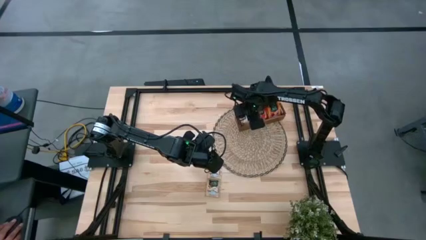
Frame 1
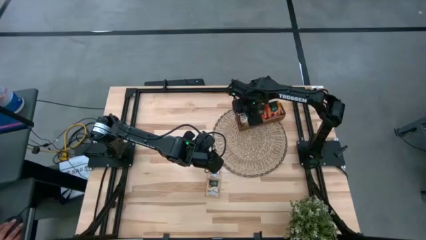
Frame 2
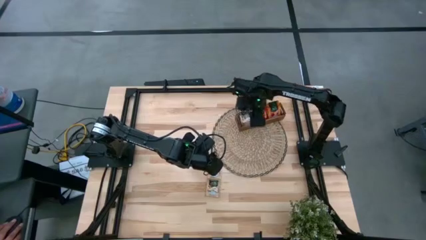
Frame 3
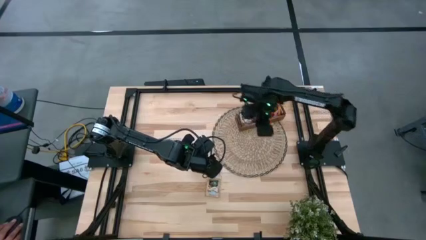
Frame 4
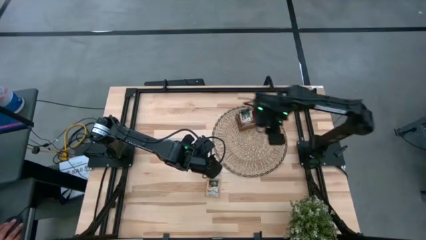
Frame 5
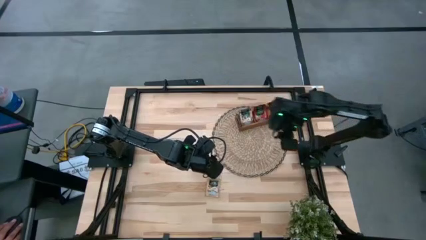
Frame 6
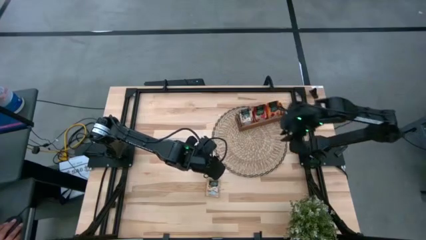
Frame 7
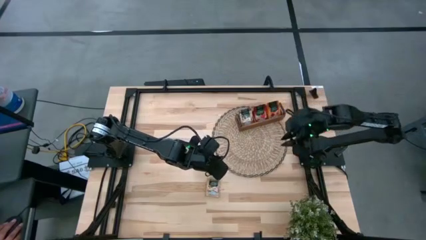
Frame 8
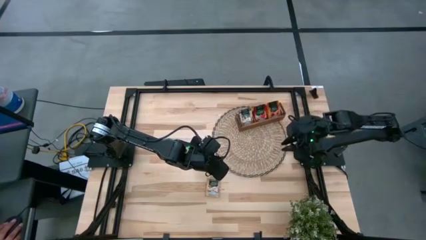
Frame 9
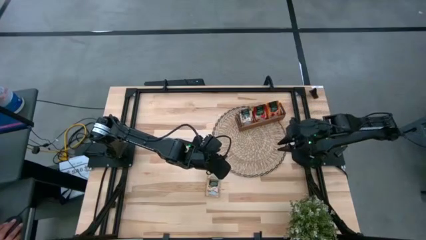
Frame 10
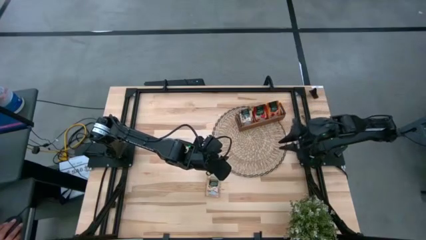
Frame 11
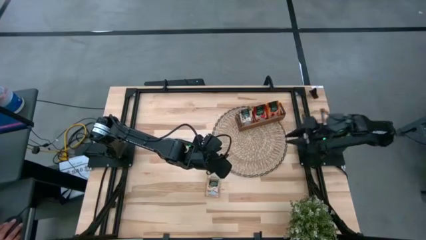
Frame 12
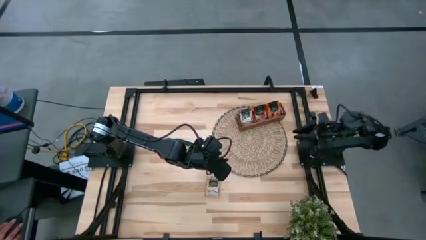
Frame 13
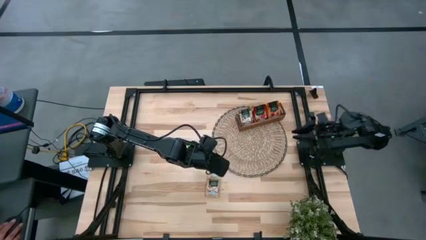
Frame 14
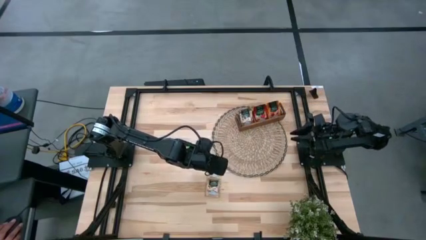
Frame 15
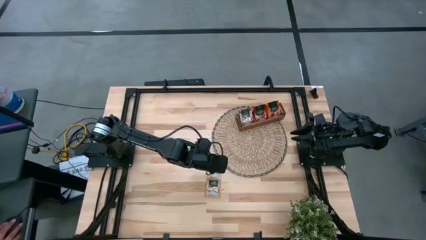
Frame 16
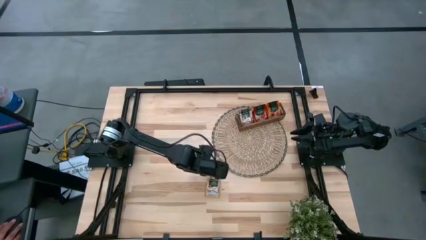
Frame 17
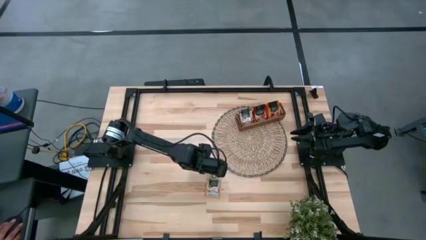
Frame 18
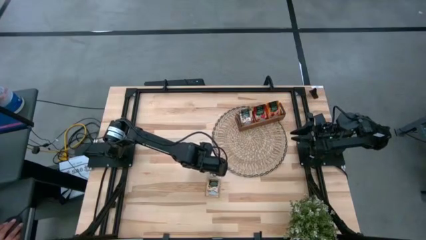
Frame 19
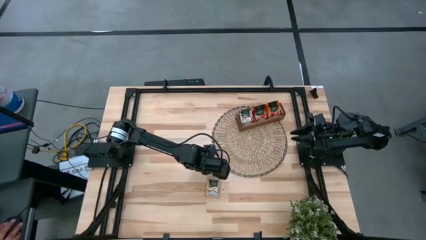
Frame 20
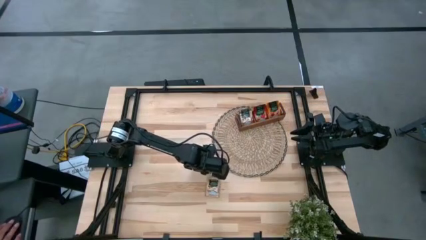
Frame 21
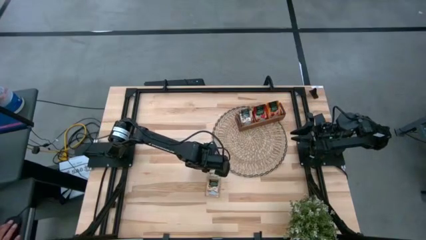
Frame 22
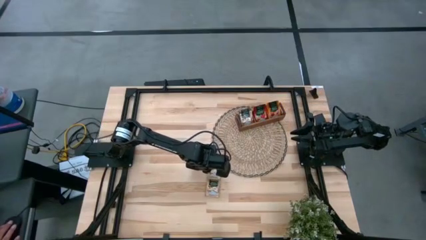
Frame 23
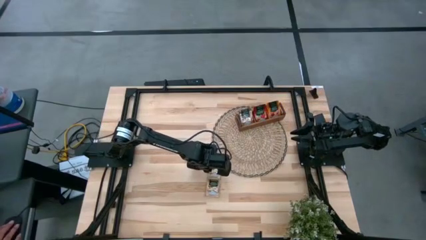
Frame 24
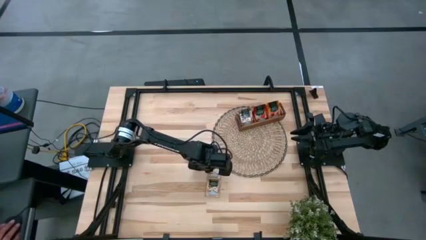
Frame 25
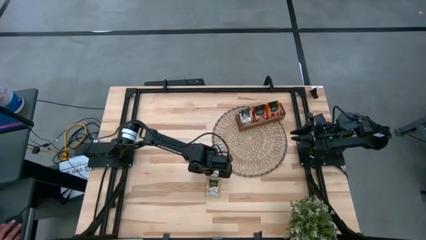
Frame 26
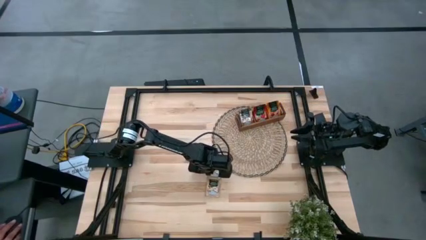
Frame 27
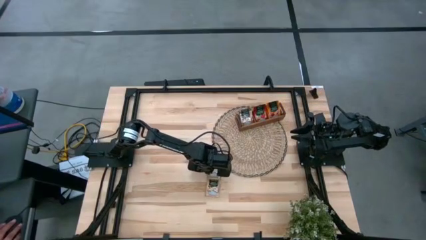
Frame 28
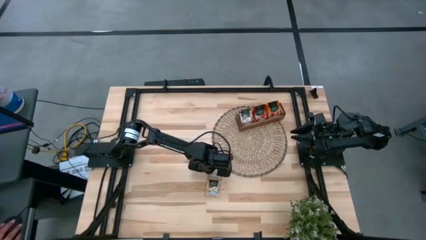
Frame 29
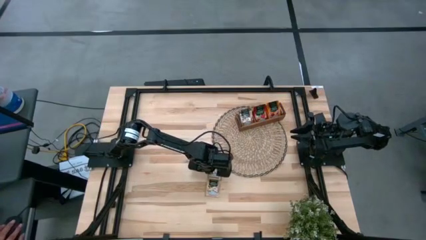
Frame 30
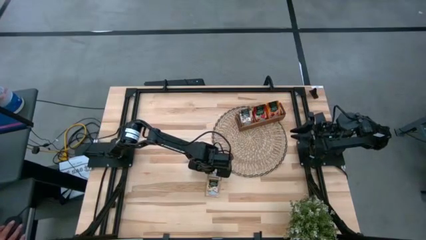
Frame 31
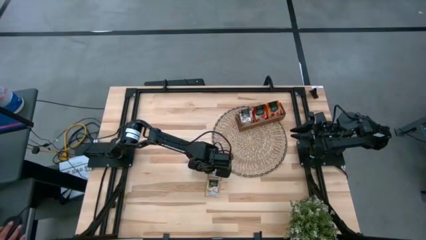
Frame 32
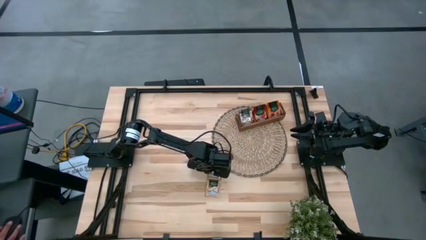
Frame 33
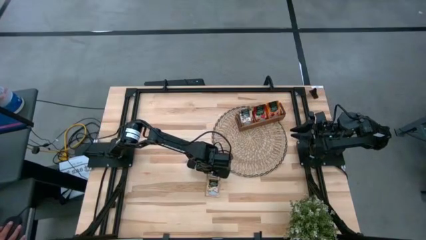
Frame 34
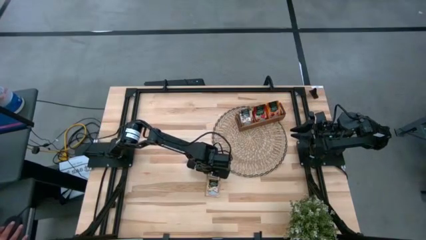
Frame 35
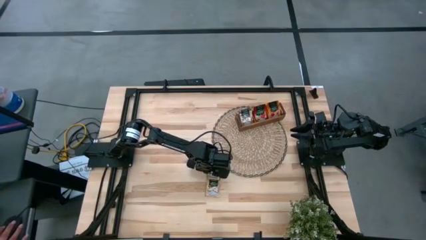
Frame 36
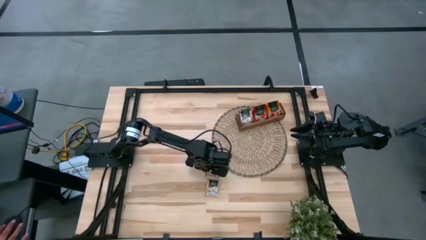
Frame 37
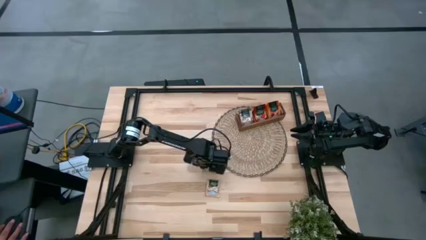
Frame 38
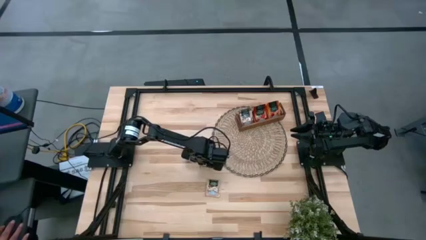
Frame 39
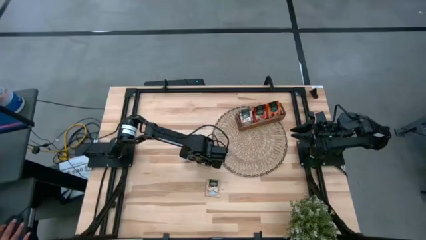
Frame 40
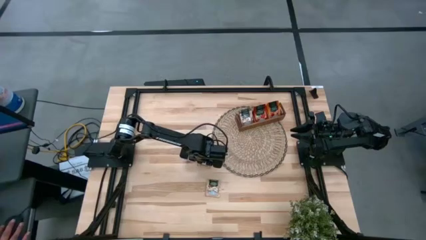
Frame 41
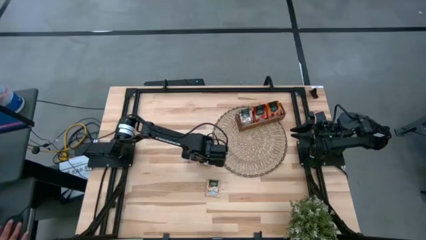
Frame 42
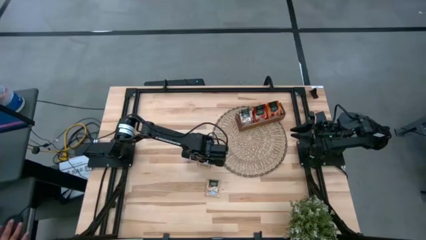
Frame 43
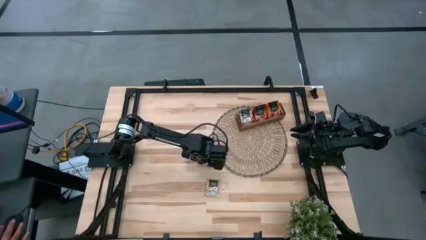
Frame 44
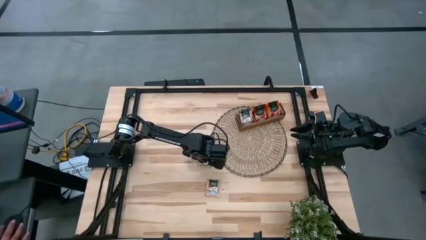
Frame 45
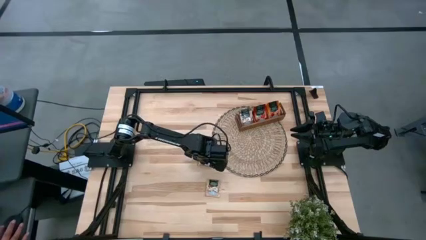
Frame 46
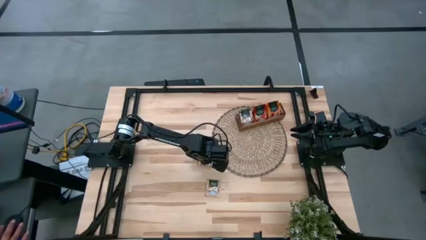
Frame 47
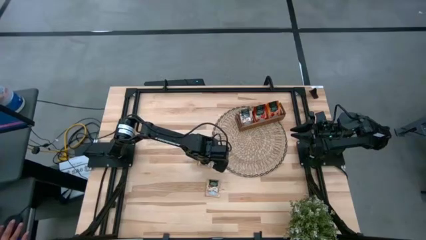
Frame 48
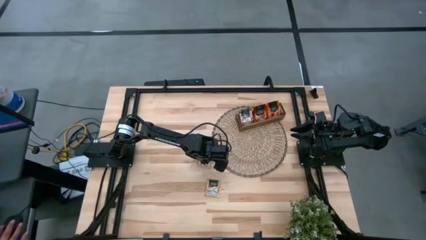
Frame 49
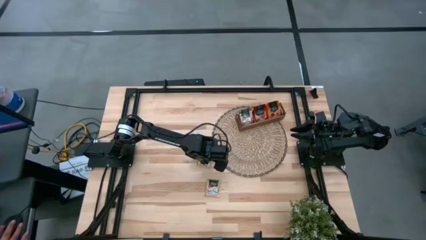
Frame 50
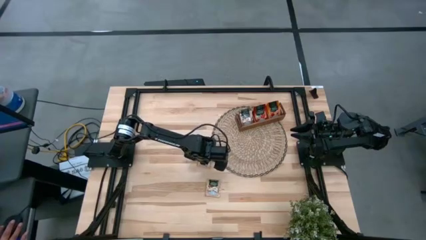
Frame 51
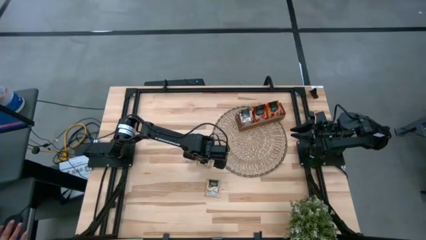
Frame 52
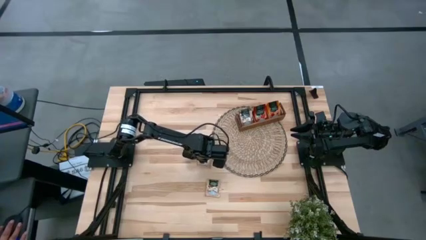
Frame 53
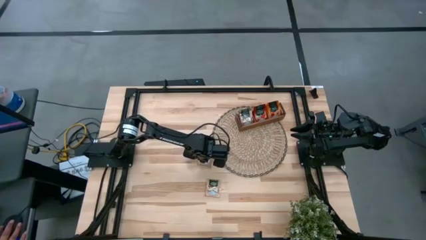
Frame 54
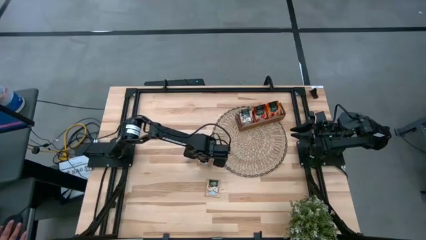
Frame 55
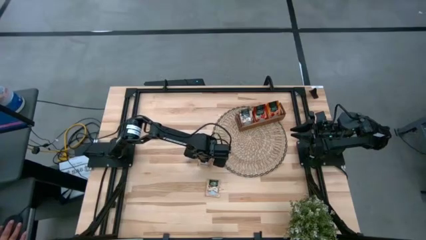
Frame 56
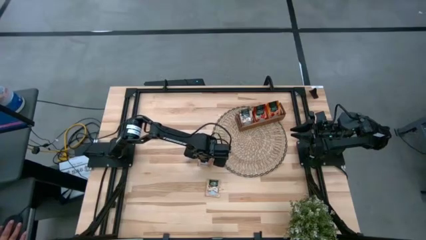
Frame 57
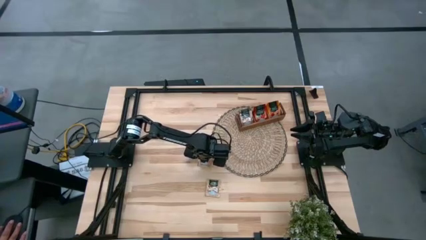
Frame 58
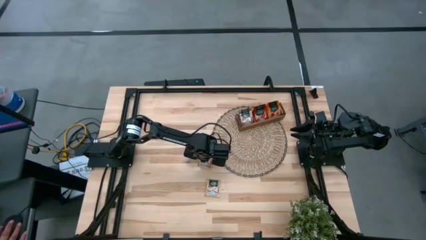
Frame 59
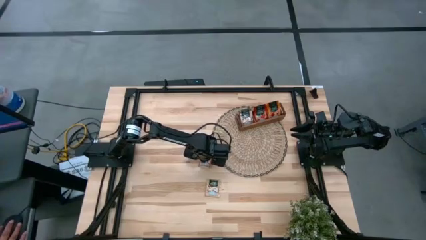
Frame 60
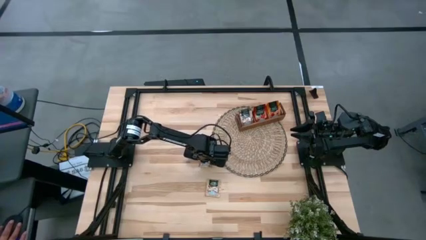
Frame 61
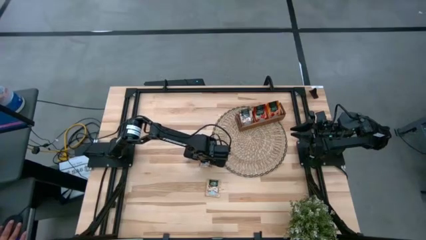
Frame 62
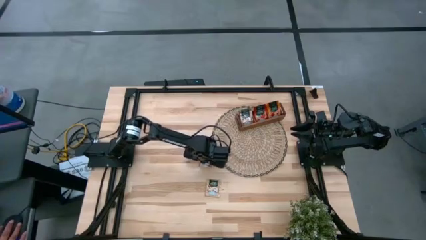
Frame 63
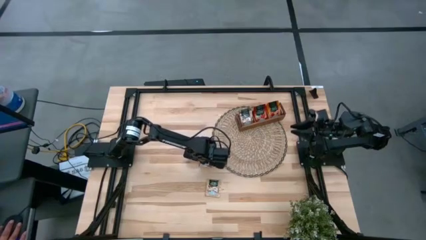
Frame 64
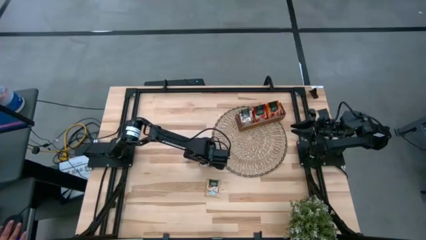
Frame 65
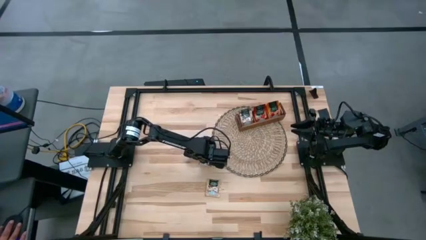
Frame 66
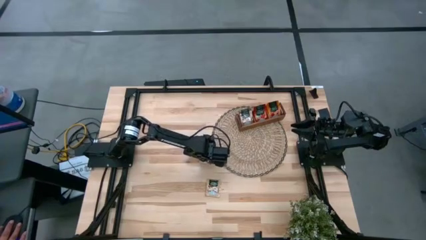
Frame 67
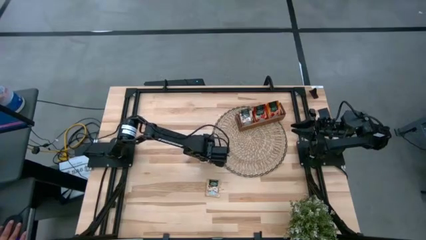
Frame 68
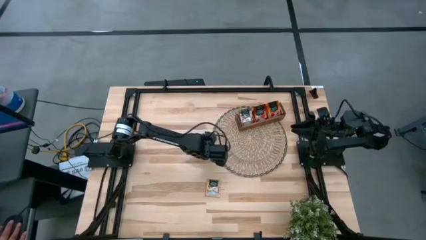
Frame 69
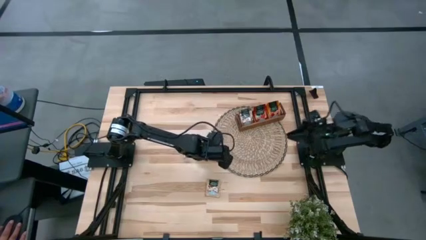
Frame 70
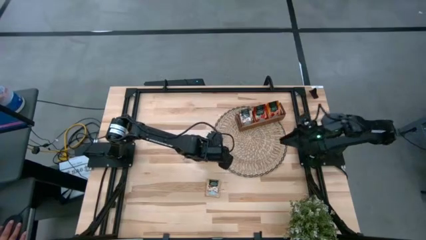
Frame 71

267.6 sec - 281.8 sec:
Task: Pick & Place Tea
Put the brown tea pack into the left compartment of the brown organizer
